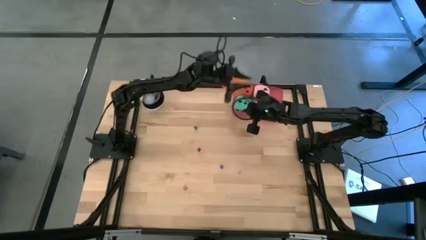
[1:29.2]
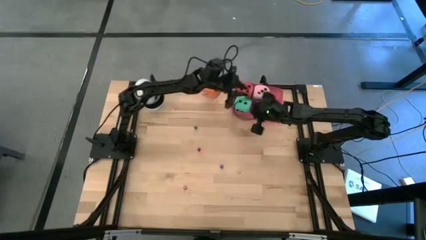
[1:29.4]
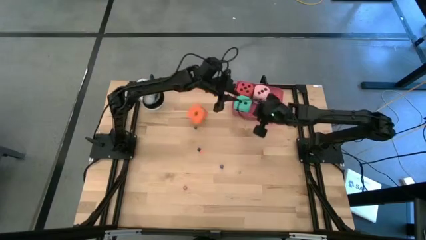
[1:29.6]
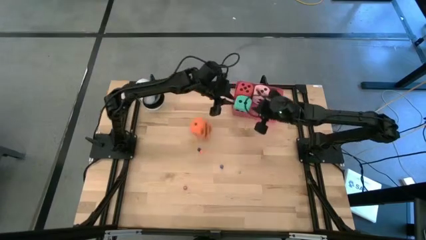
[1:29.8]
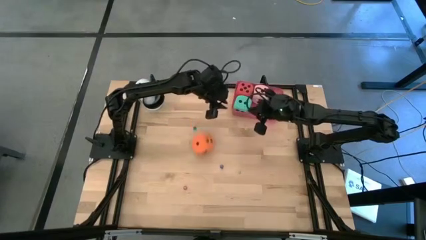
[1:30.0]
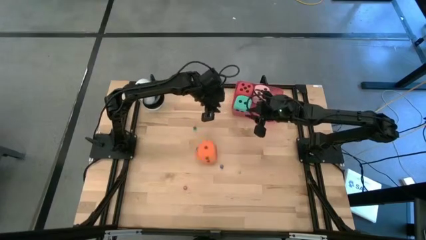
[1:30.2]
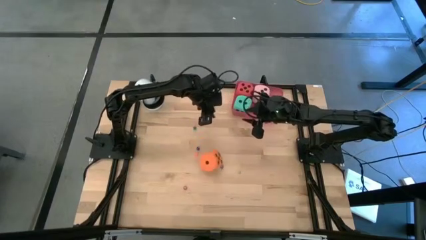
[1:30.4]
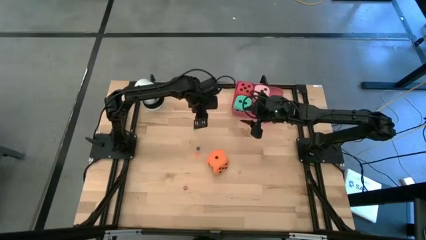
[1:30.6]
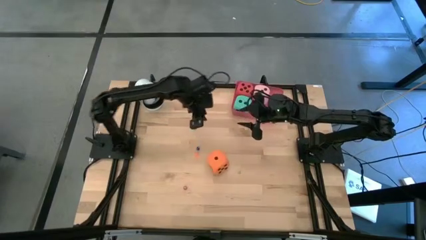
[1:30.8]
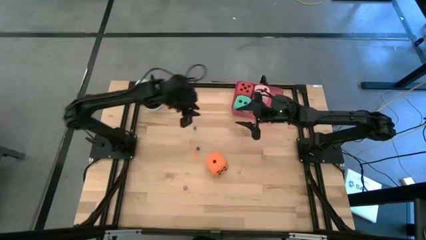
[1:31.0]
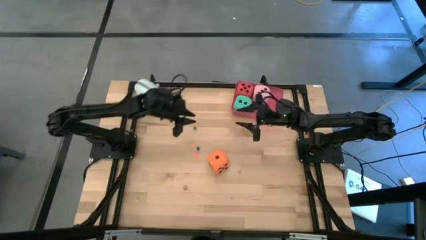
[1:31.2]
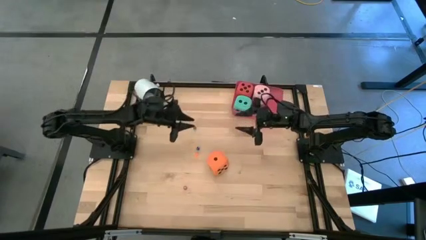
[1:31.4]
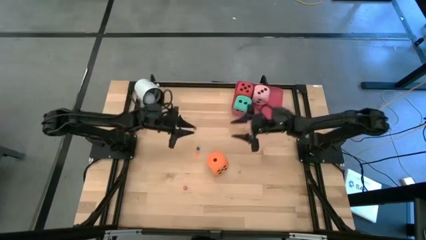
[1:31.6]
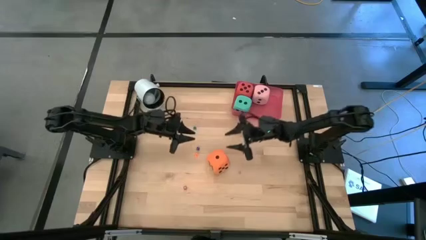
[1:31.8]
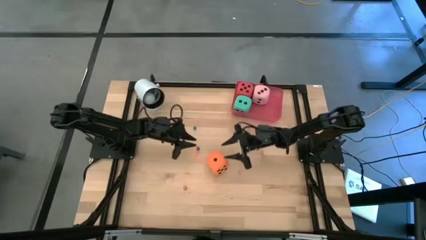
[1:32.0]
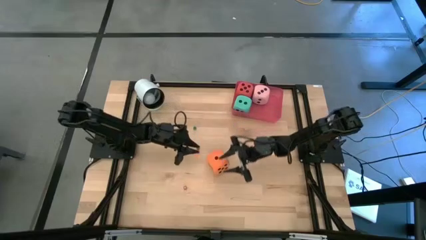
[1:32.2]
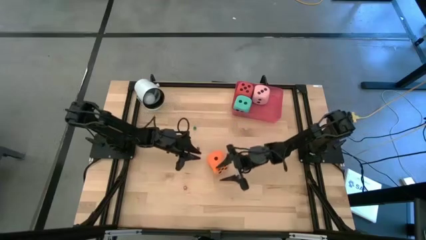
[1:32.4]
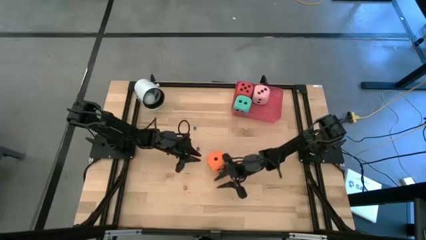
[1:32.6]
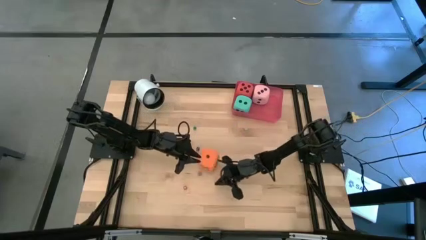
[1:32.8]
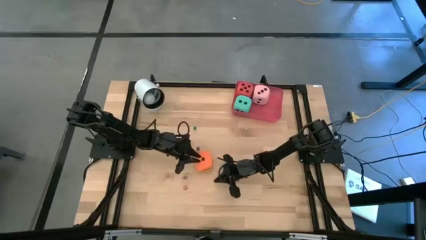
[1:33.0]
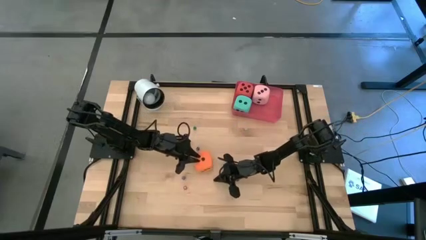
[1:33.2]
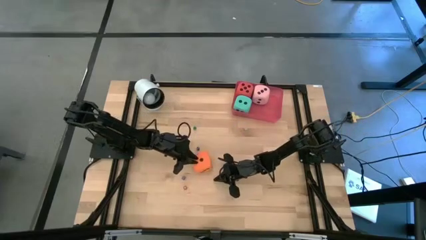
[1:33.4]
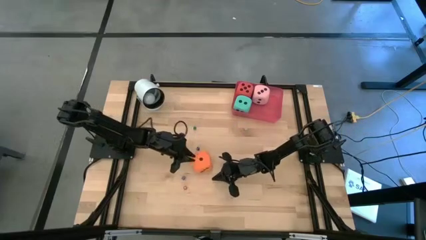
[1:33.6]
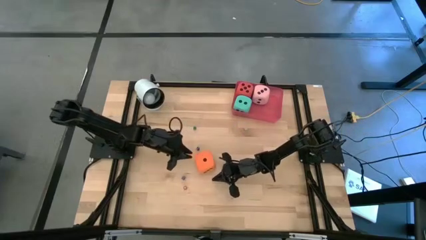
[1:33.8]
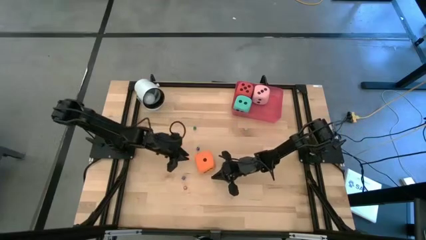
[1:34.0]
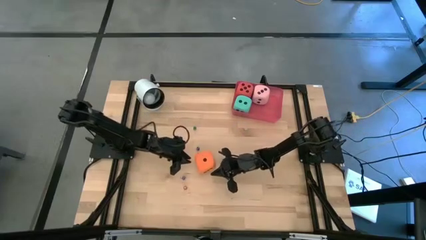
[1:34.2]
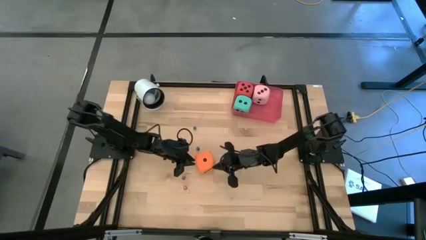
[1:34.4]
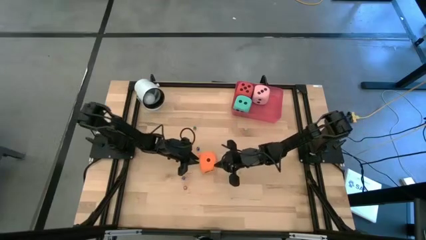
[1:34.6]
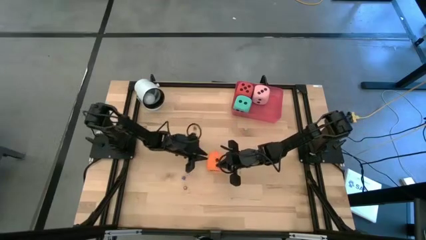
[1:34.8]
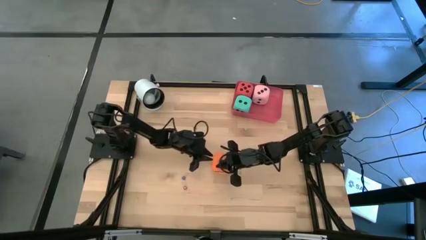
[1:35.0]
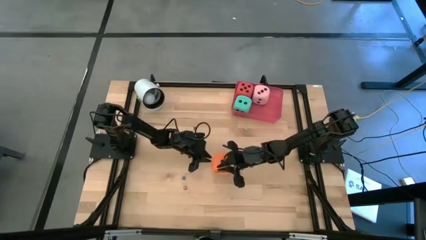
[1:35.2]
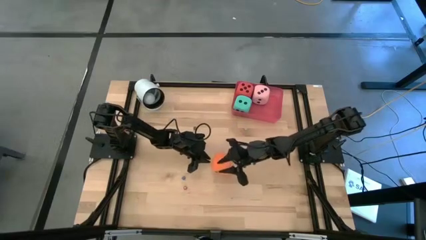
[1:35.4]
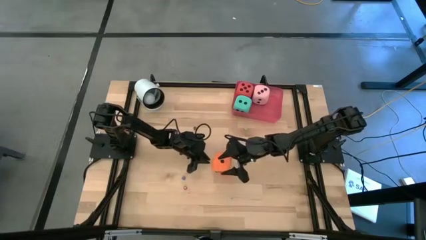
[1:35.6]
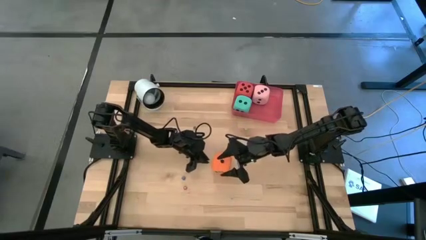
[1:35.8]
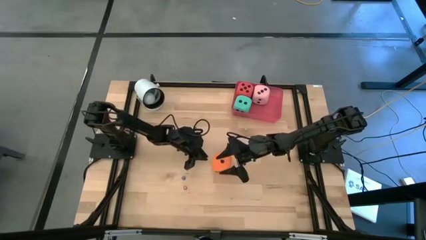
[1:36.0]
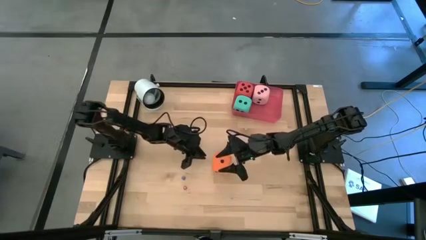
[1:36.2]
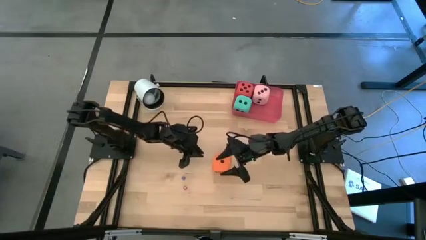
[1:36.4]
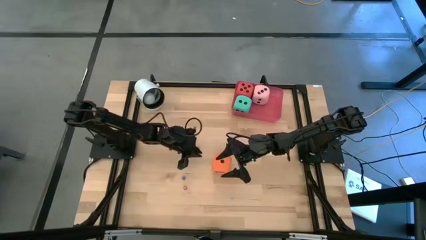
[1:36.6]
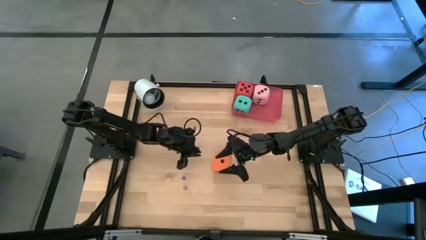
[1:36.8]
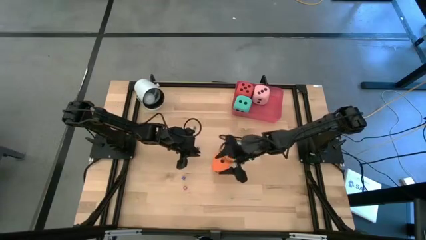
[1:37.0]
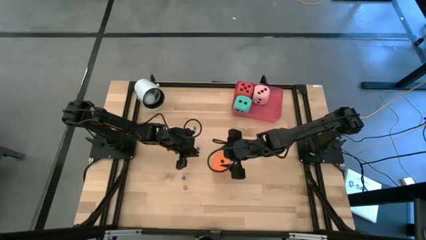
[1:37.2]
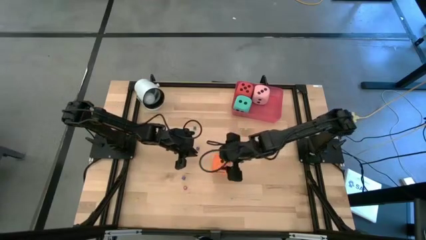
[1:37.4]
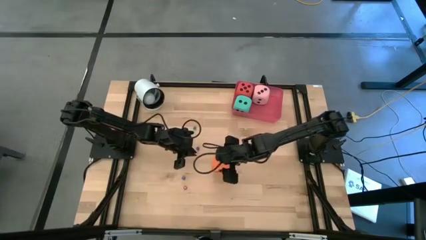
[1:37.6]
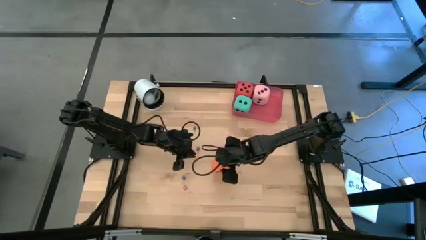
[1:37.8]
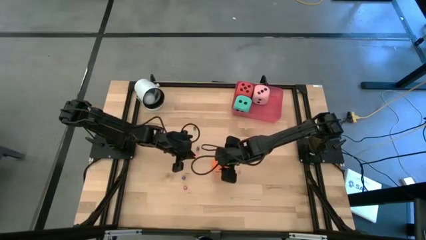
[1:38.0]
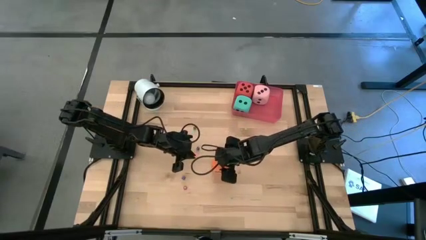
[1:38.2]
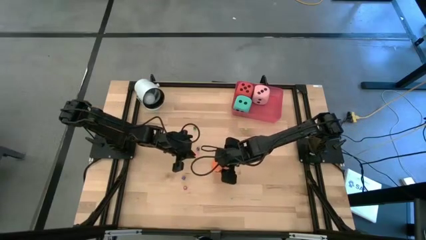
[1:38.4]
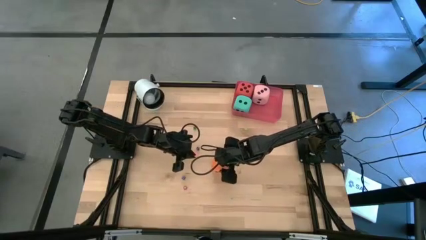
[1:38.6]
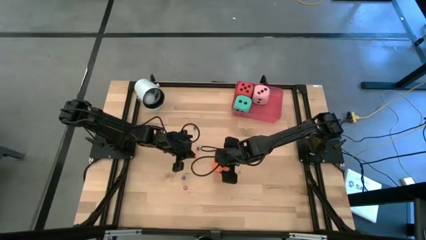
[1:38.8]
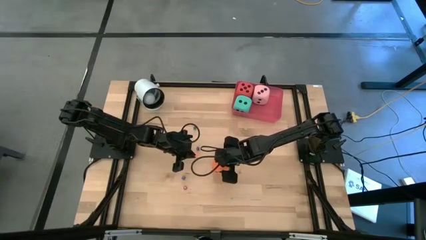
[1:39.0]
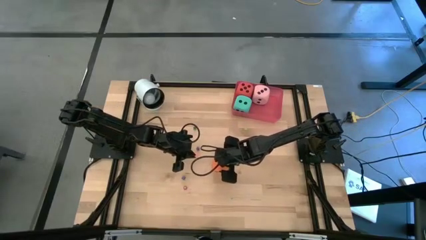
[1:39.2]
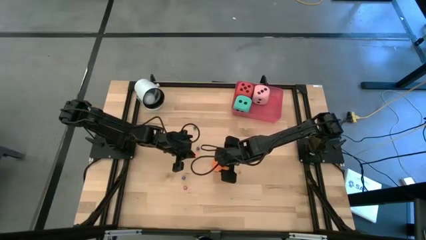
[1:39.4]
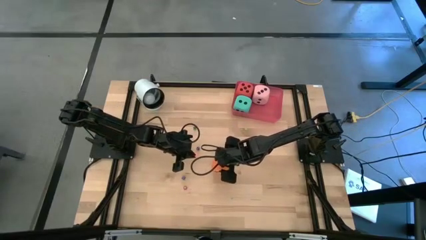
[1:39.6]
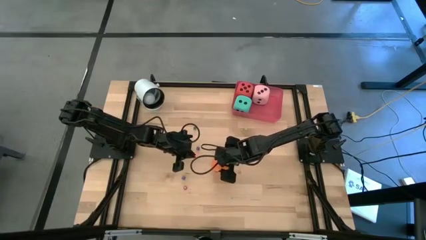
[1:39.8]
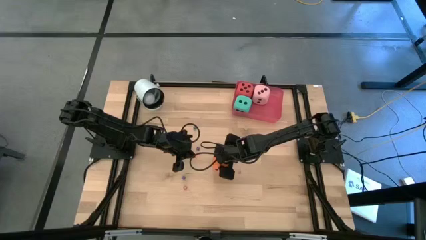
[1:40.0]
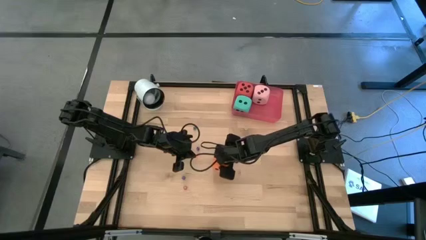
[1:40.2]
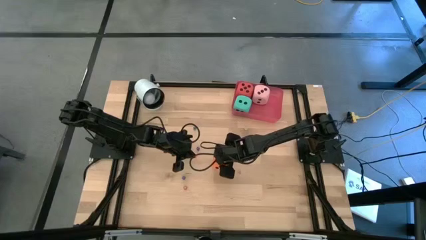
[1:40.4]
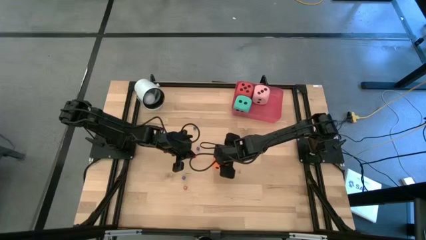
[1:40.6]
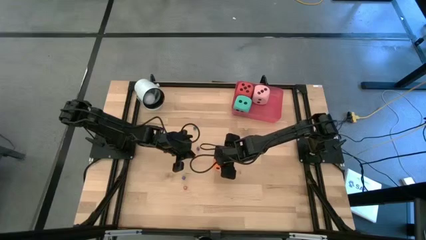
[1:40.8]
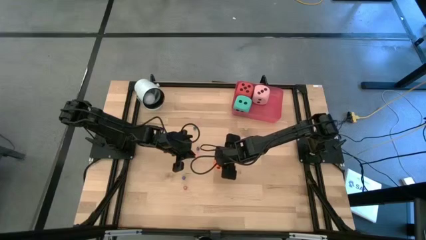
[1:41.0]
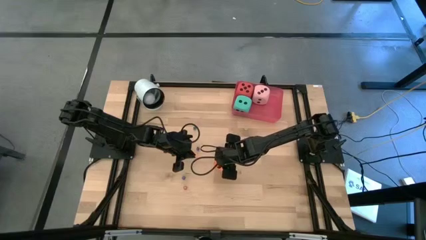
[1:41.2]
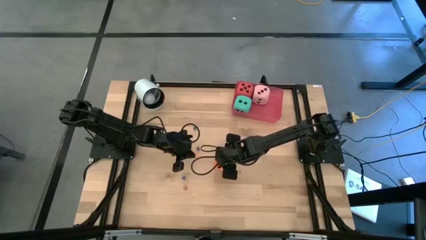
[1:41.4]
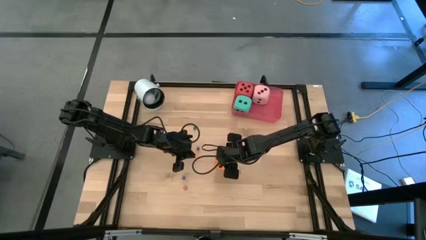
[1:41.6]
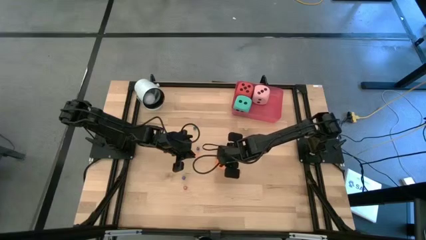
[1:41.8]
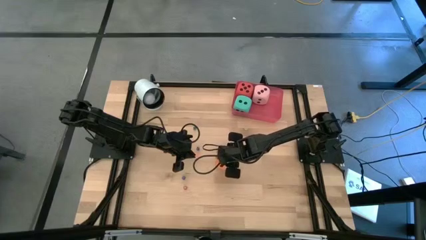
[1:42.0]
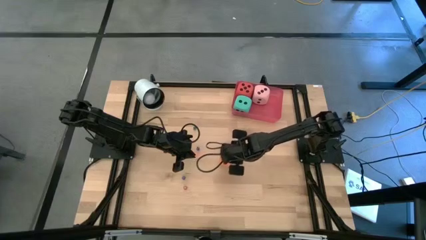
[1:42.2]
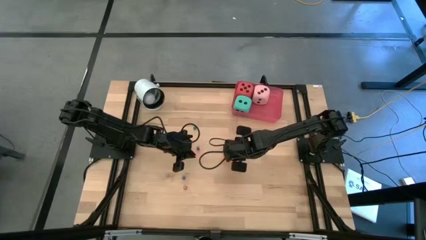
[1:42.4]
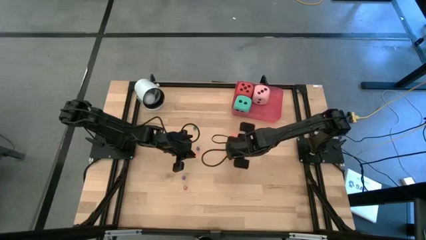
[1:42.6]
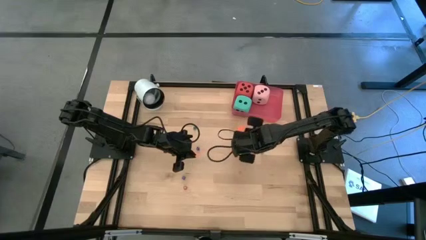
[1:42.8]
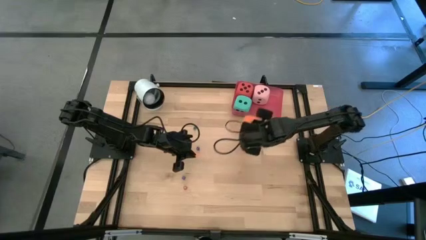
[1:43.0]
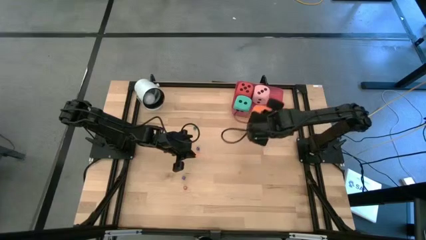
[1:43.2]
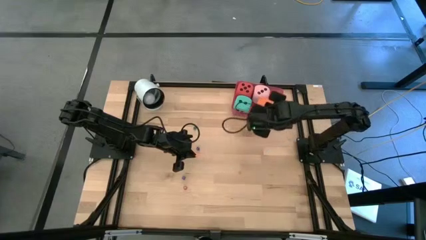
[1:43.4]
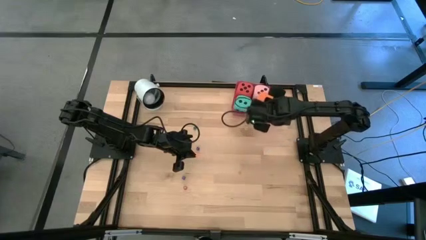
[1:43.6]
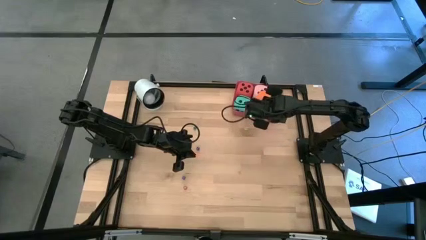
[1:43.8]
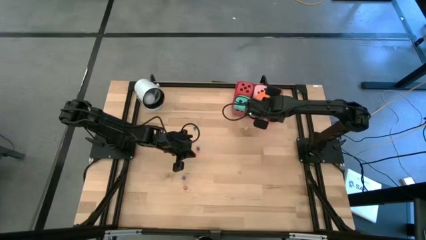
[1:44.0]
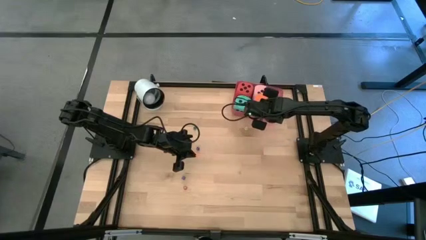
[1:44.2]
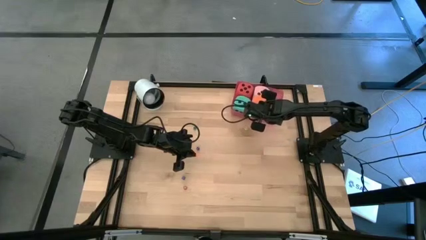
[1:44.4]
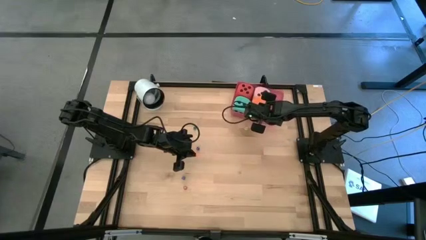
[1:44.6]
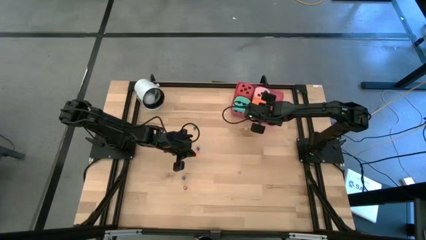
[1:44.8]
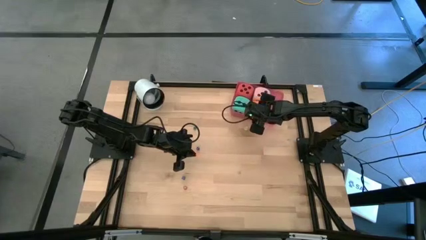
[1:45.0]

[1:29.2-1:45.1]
Task: Pick & Place Dice
Put the large orange dice into the red bin
